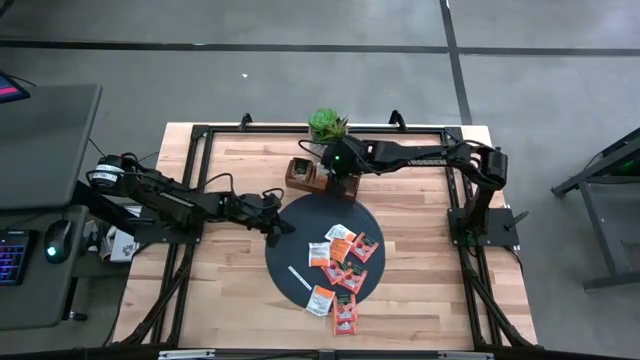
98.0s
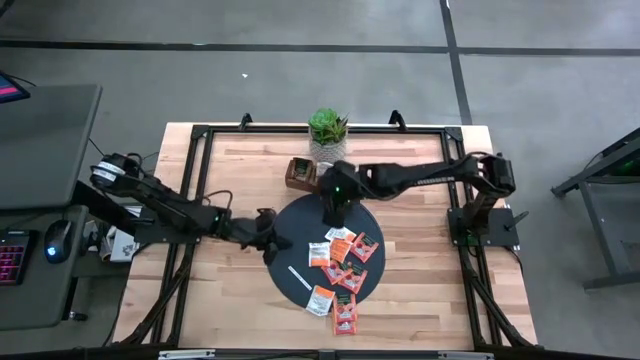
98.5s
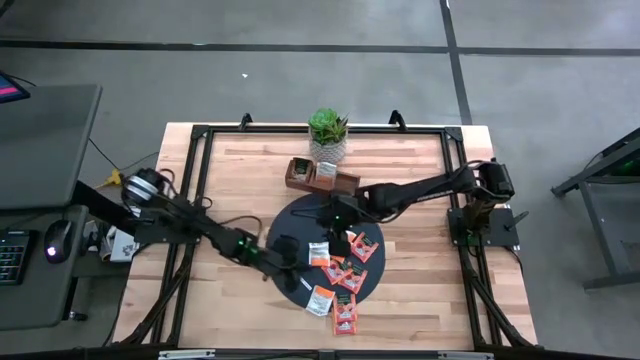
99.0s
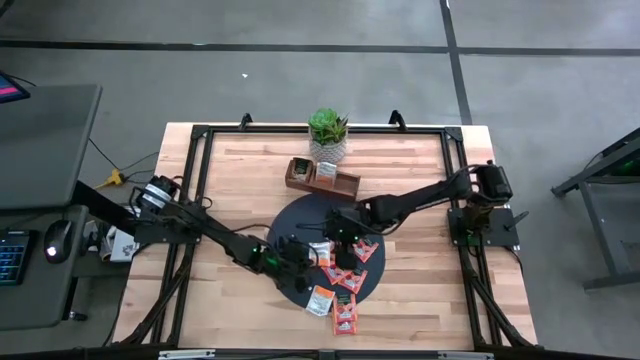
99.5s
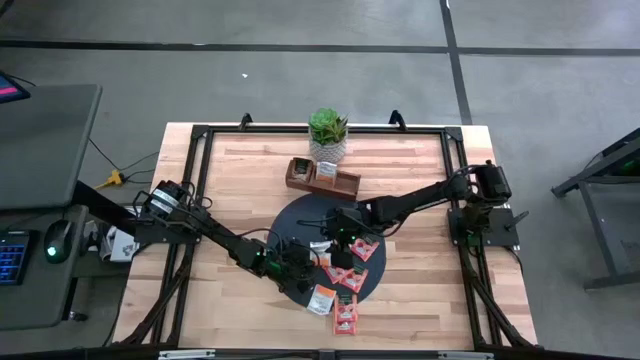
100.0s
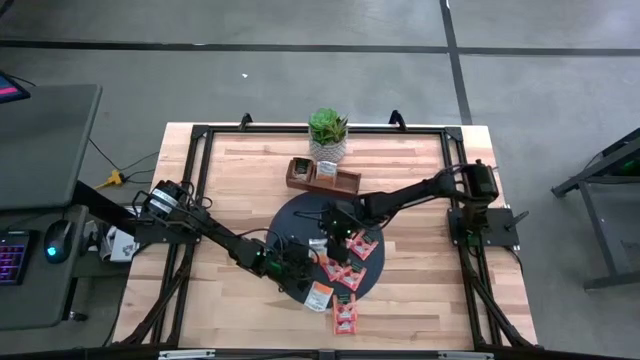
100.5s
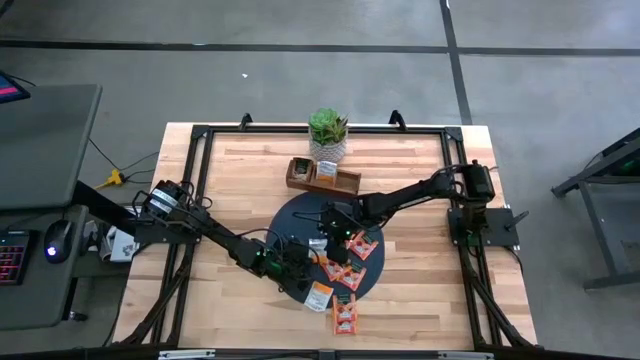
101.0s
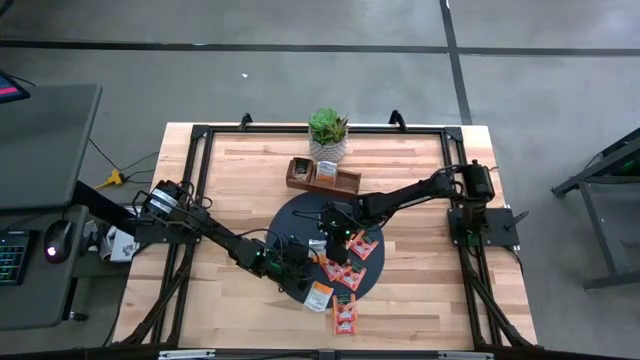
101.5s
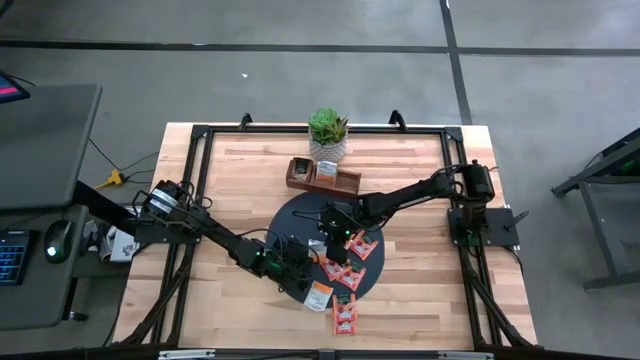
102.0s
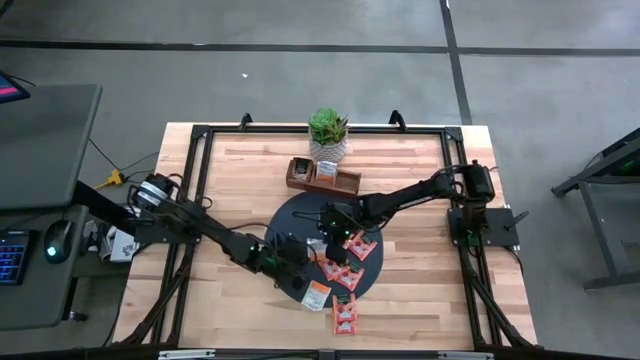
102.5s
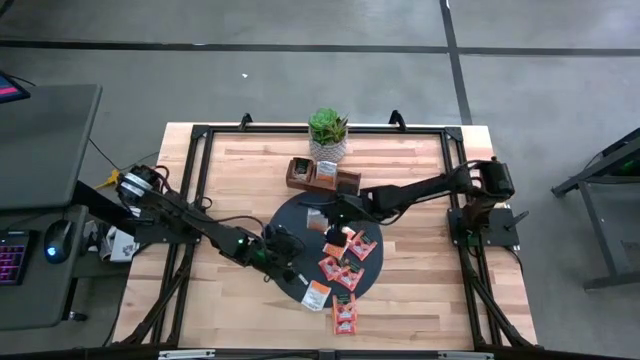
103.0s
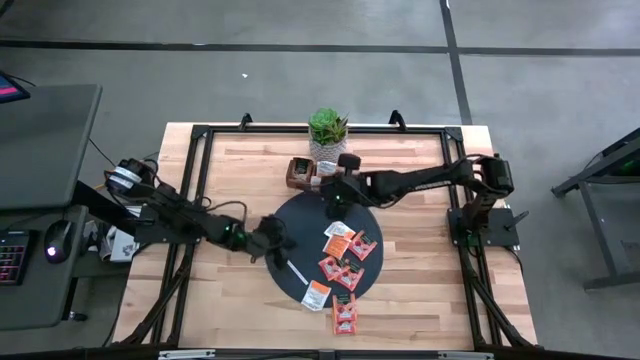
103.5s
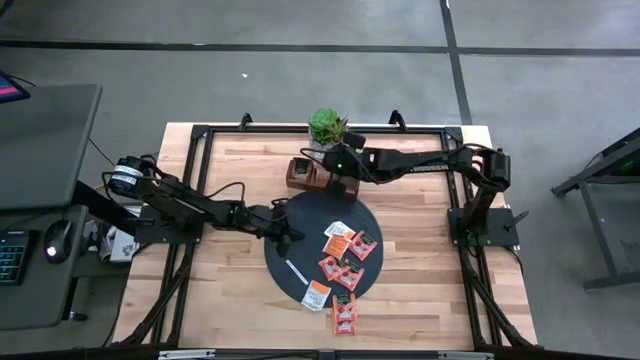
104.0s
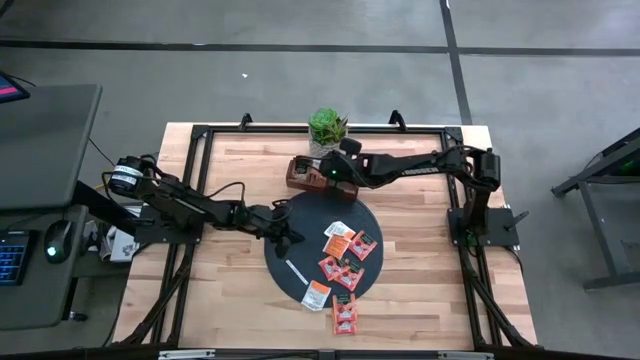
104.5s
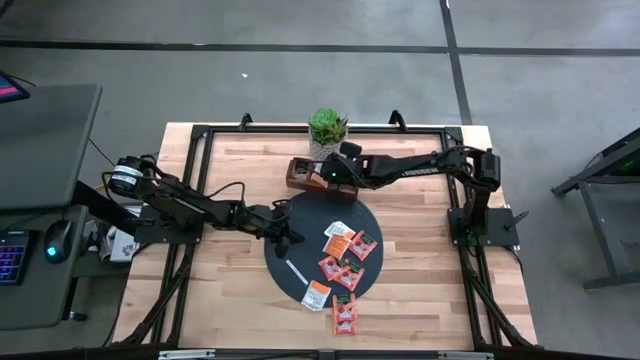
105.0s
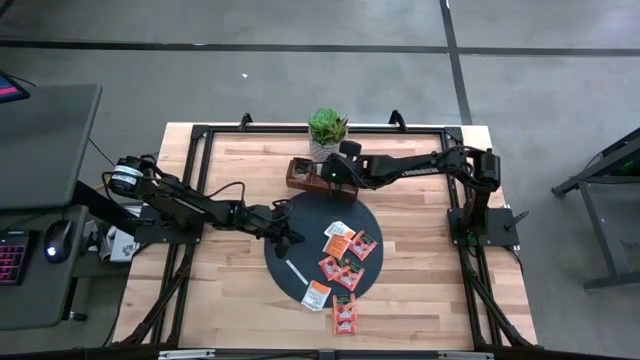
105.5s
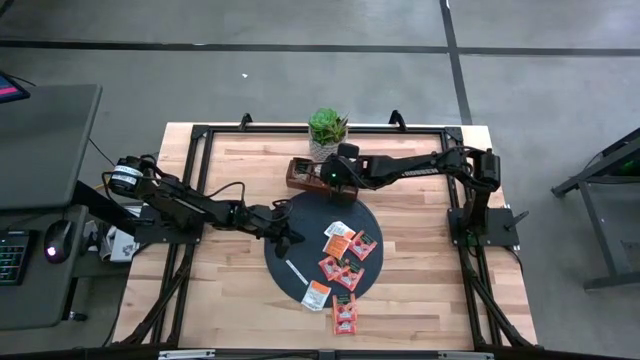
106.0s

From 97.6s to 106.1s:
Task: Pick & Place Tea
Put the white tea bag into the middle section of the wooden organizer

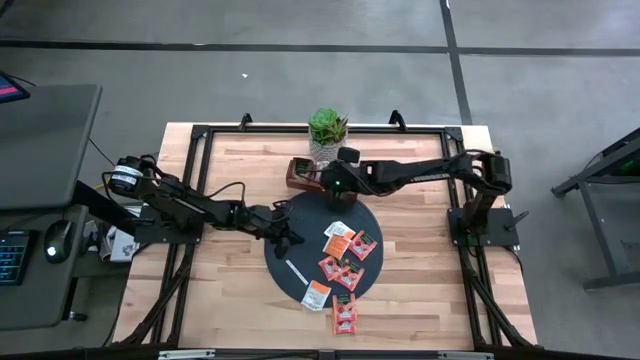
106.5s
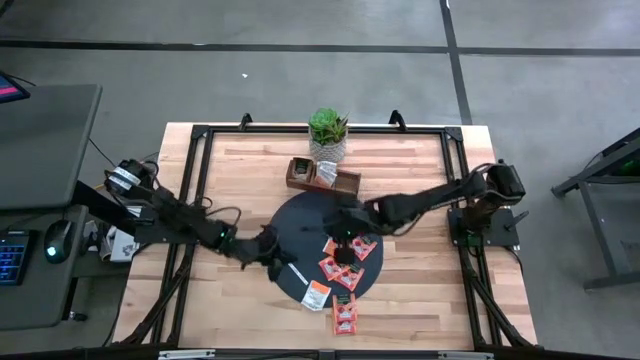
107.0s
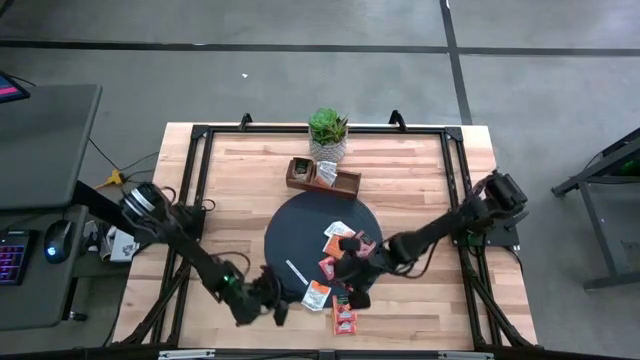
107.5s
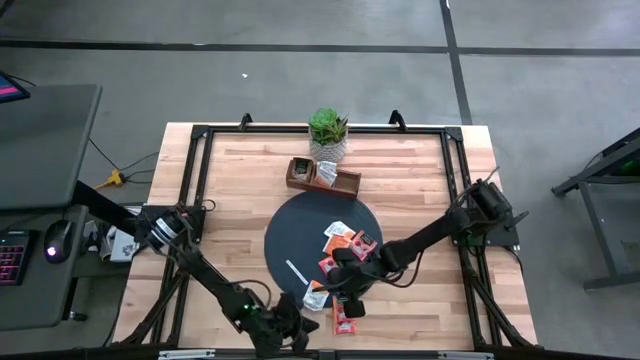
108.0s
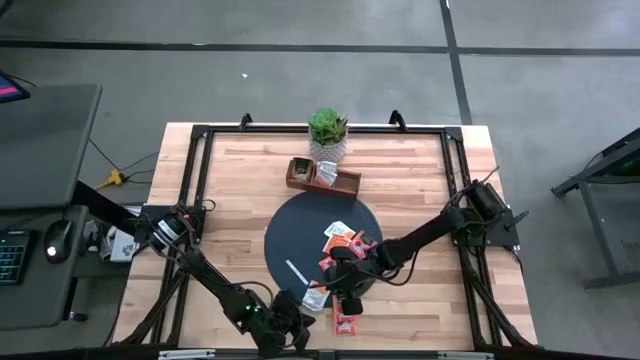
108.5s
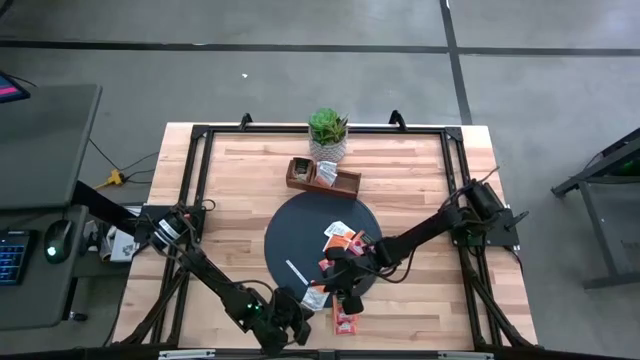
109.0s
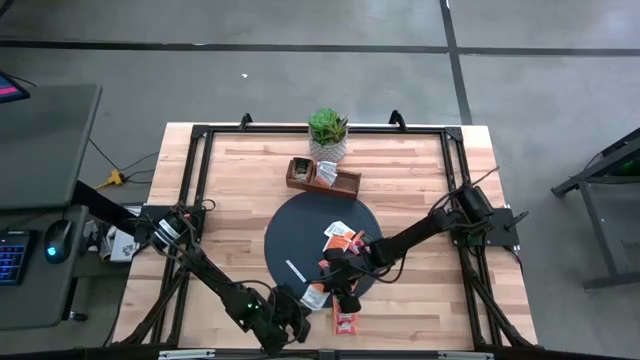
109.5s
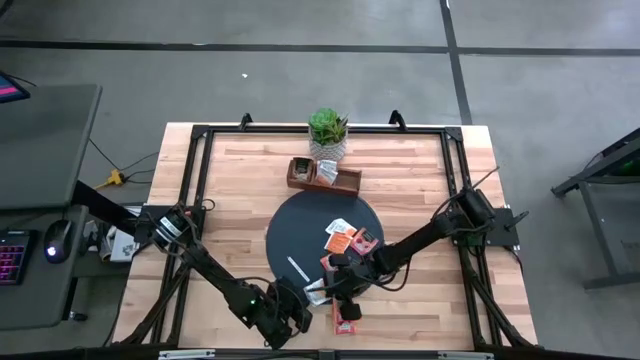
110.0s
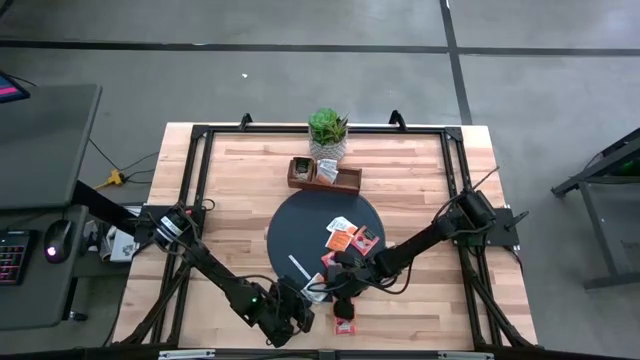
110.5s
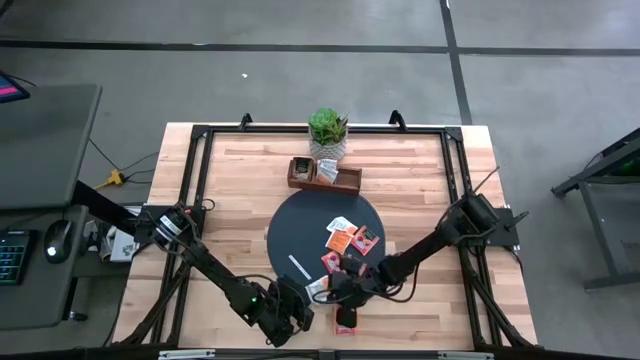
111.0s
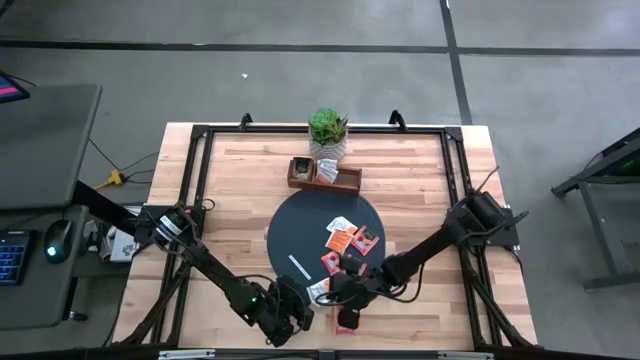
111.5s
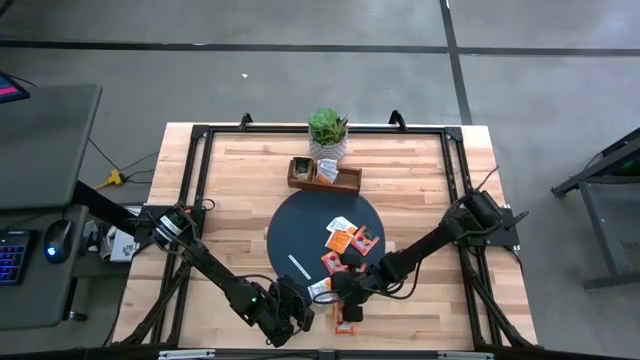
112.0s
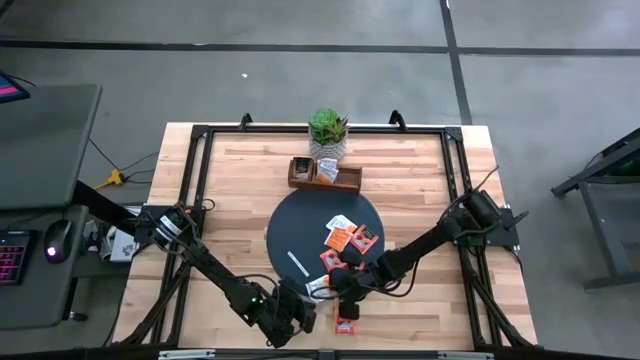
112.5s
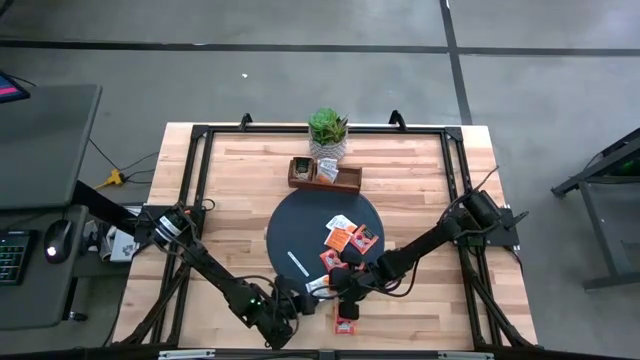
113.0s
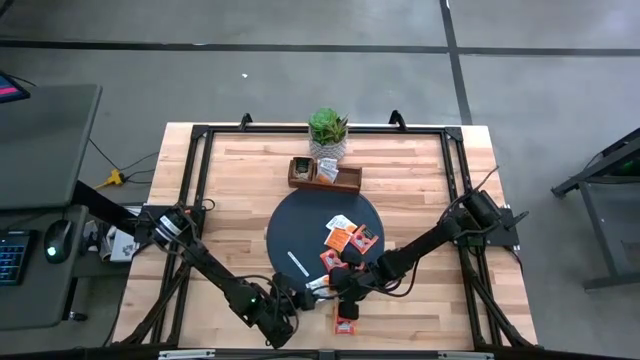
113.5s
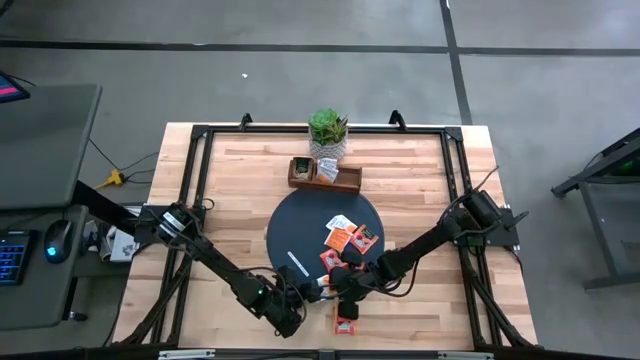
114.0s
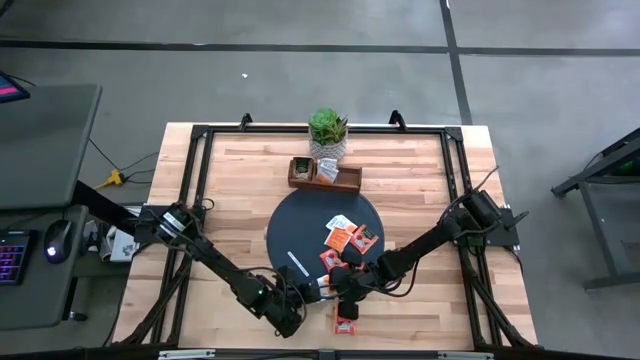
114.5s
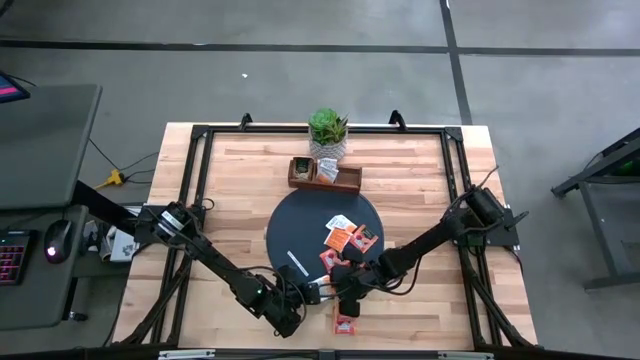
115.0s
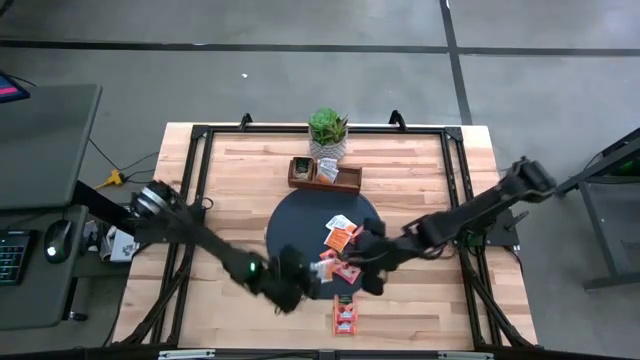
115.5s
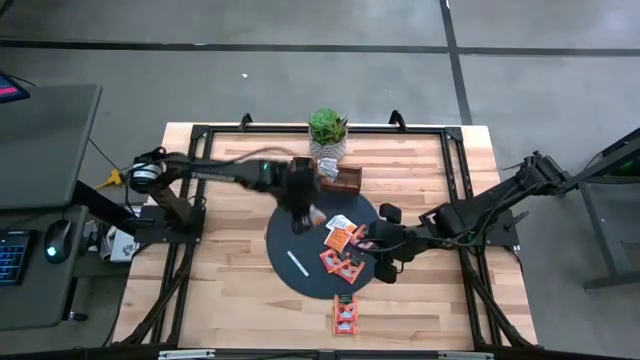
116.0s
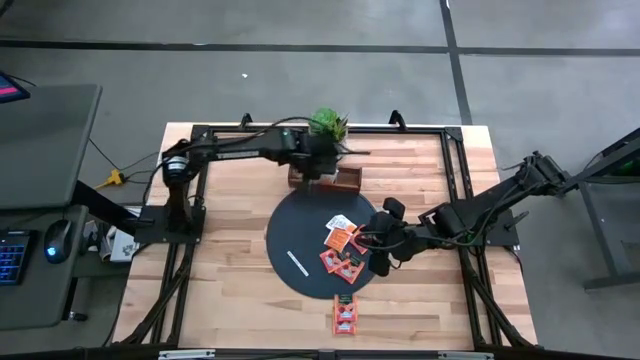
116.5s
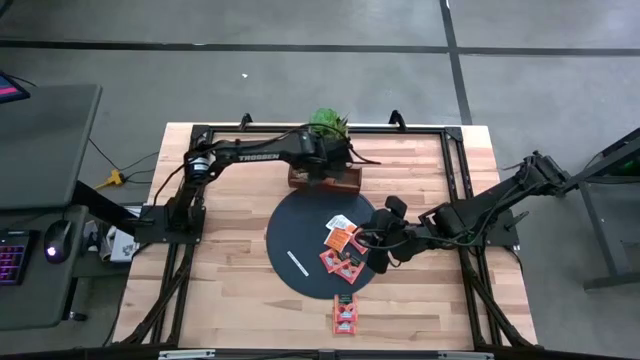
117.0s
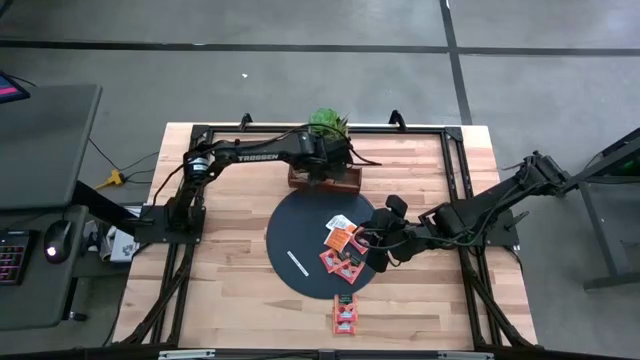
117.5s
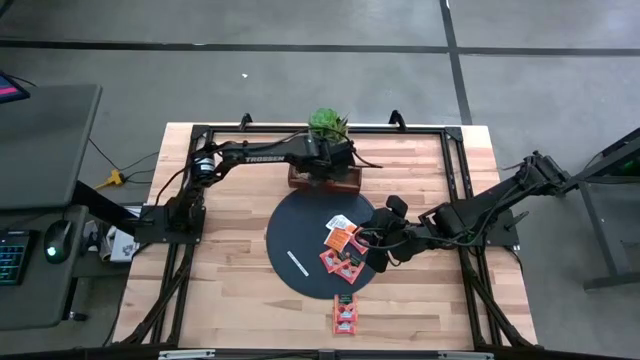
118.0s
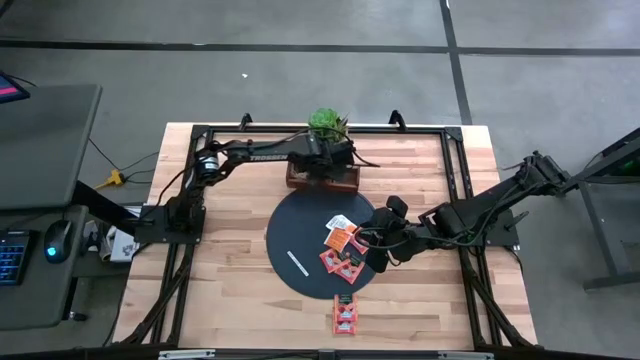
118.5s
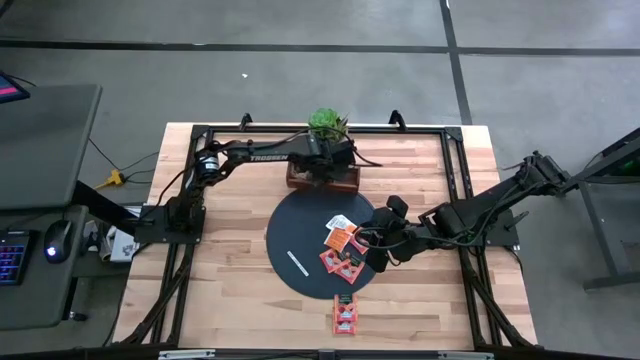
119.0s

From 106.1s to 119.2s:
Put the white tea bag into the middle section of the wooden organizer
